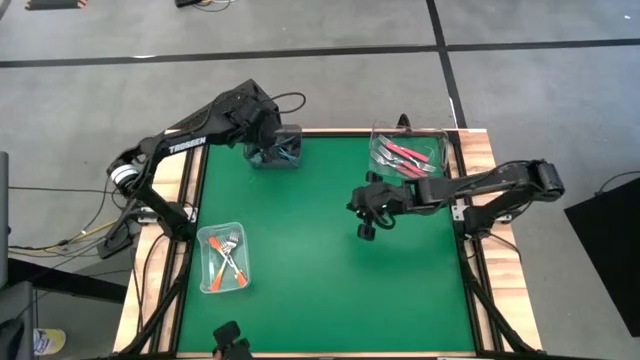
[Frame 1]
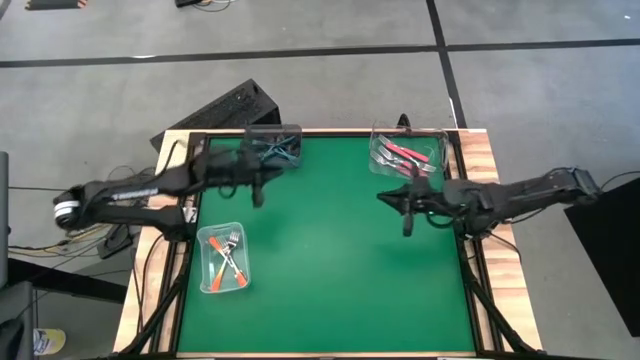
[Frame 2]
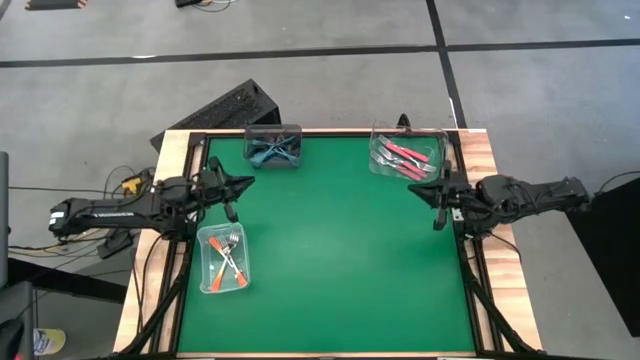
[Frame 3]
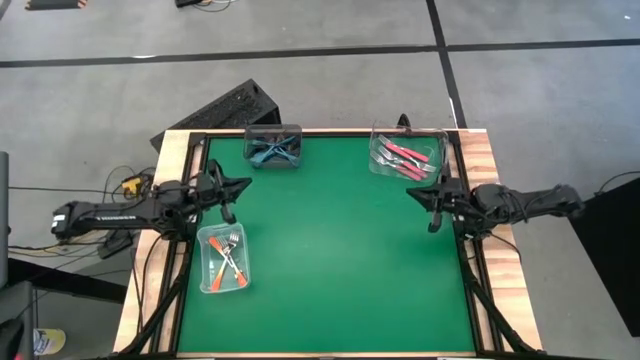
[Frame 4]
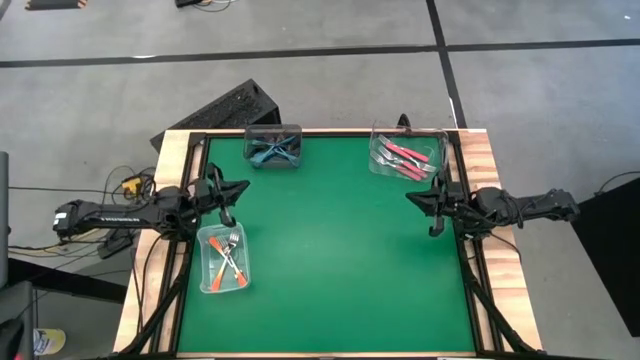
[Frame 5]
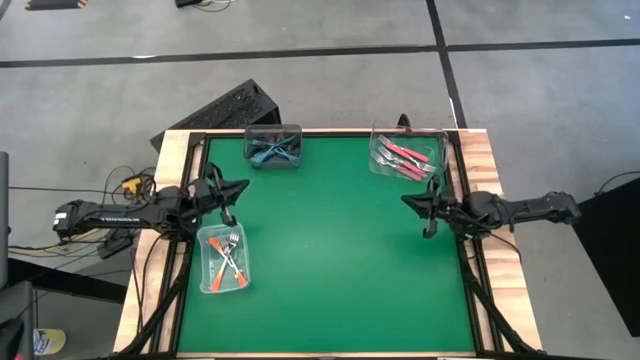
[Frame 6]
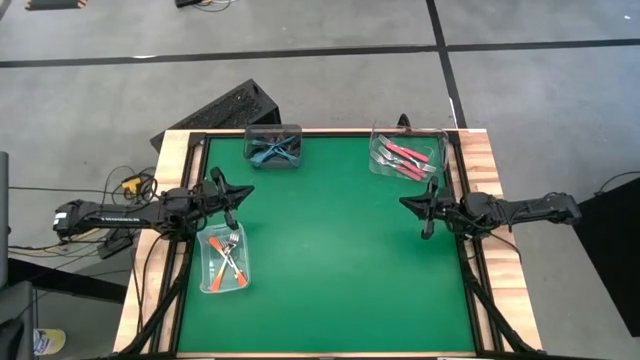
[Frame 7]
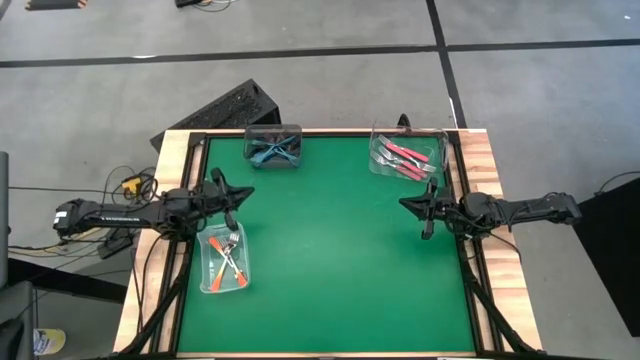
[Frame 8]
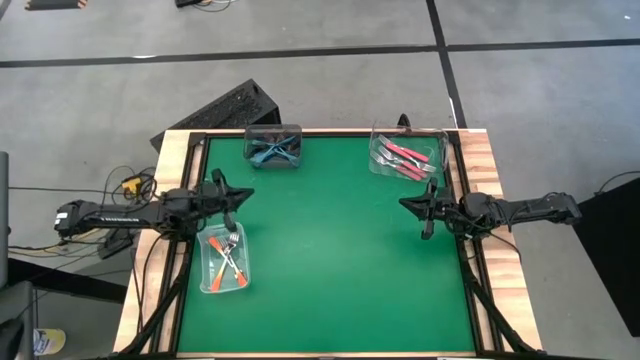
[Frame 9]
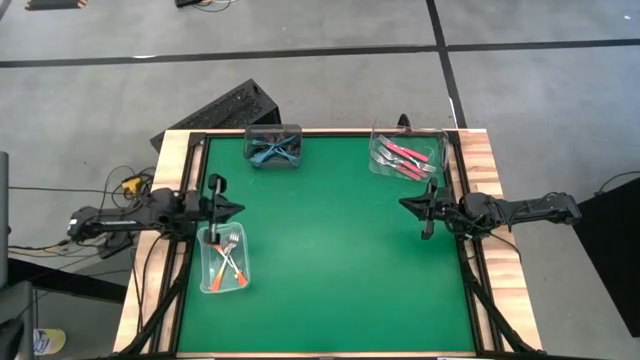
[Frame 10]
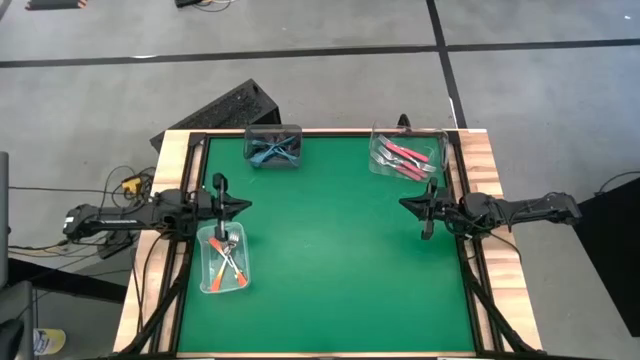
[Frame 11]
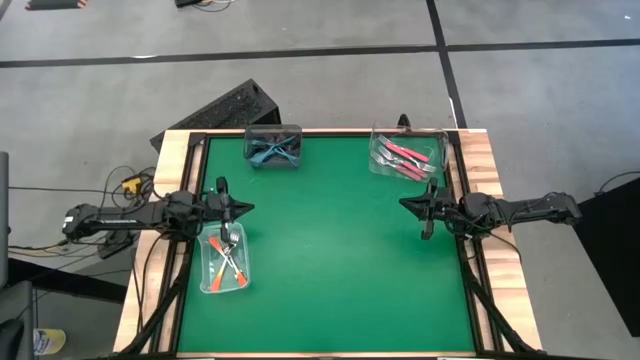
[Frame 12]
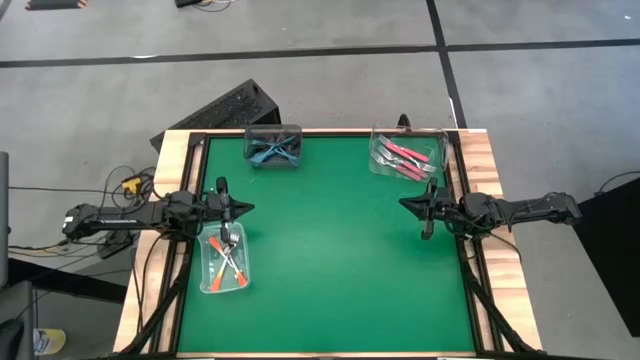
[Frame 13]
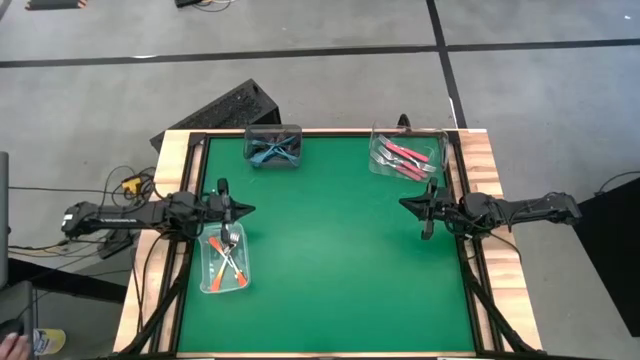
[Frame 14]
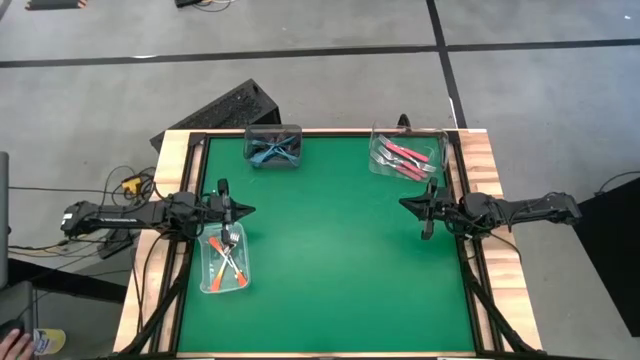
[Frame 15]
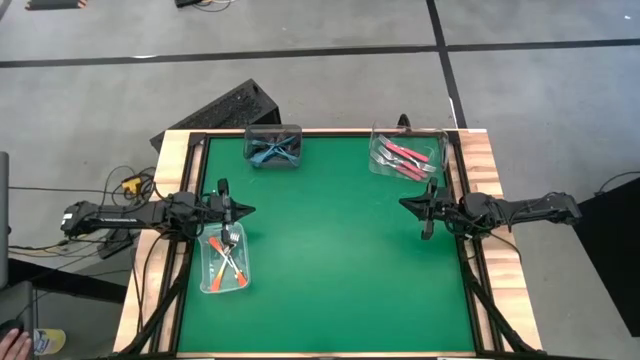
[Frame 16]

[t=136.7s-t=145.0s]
Task: Sort silverware by color (type)
Return to Home Position

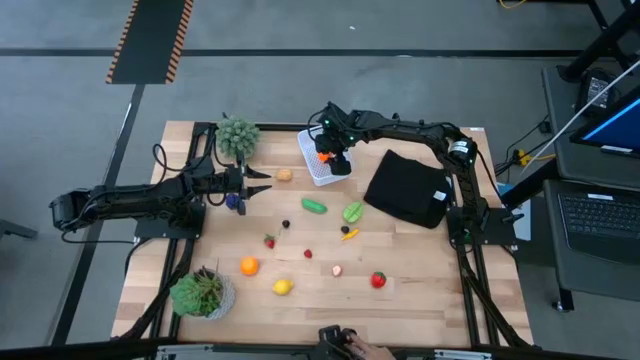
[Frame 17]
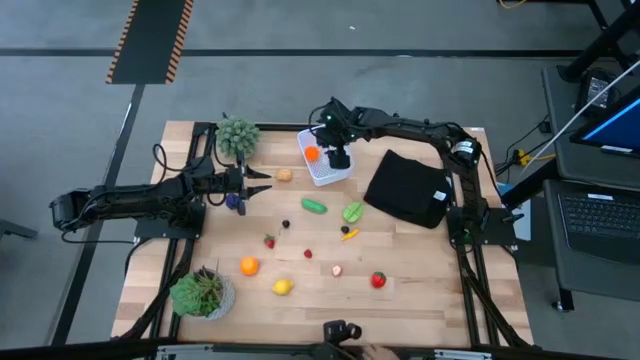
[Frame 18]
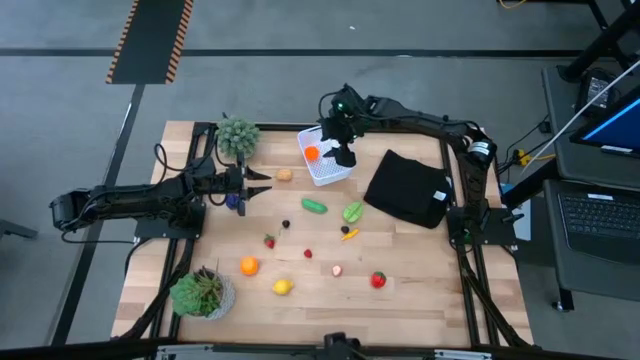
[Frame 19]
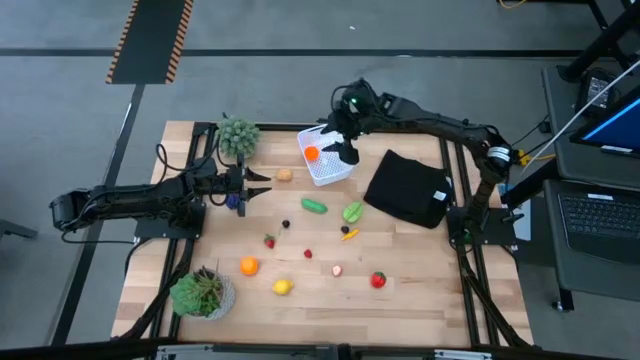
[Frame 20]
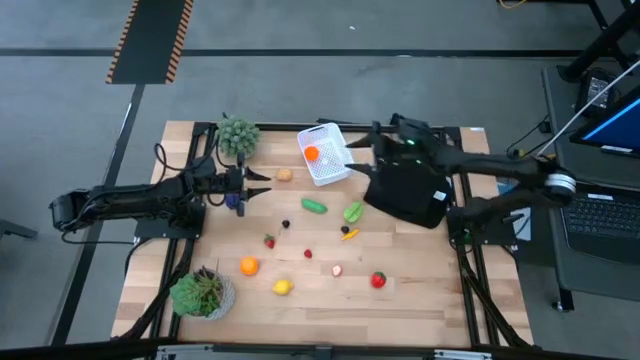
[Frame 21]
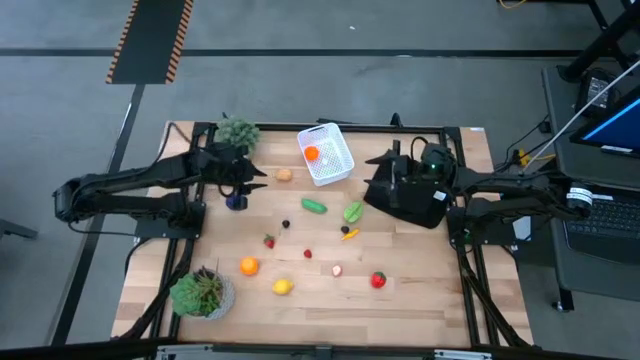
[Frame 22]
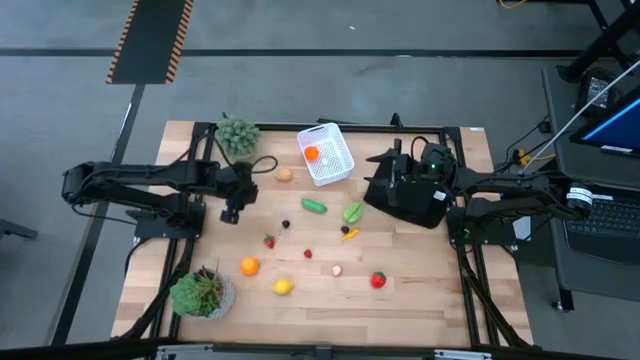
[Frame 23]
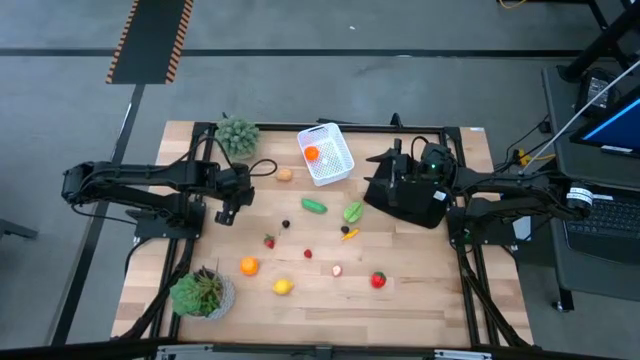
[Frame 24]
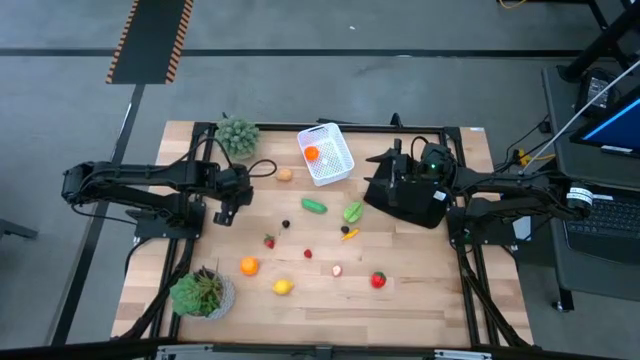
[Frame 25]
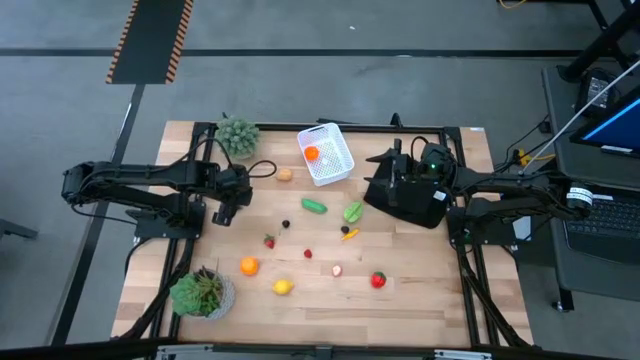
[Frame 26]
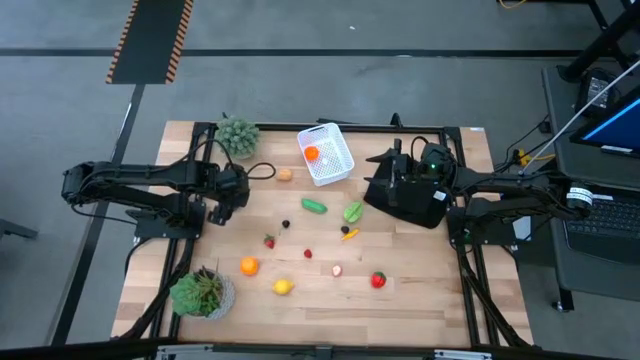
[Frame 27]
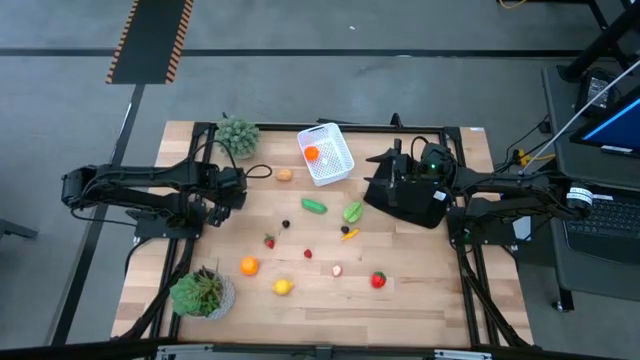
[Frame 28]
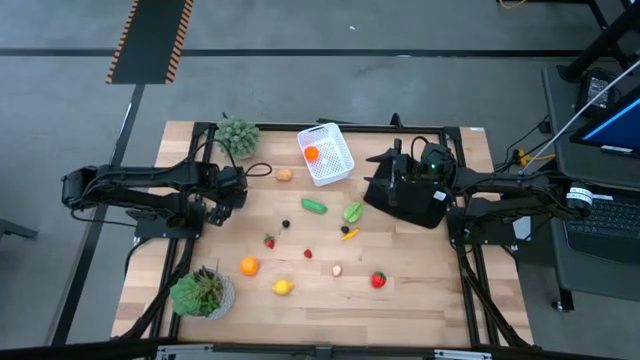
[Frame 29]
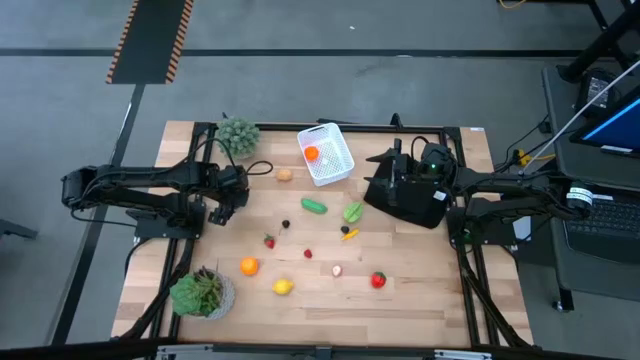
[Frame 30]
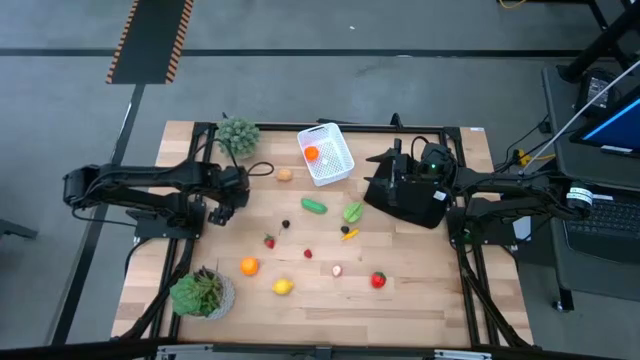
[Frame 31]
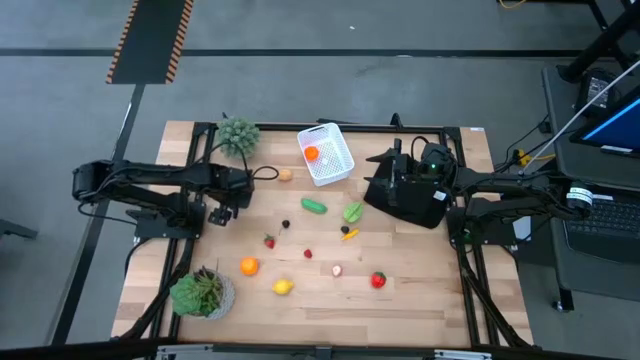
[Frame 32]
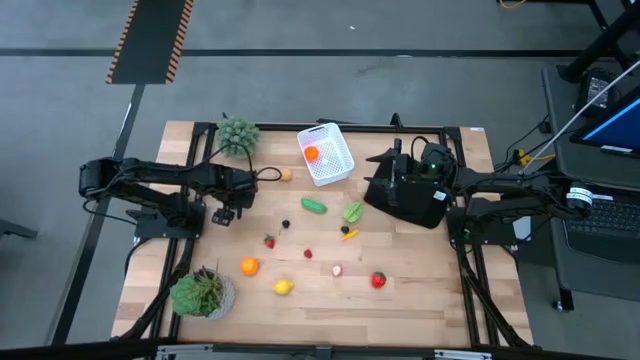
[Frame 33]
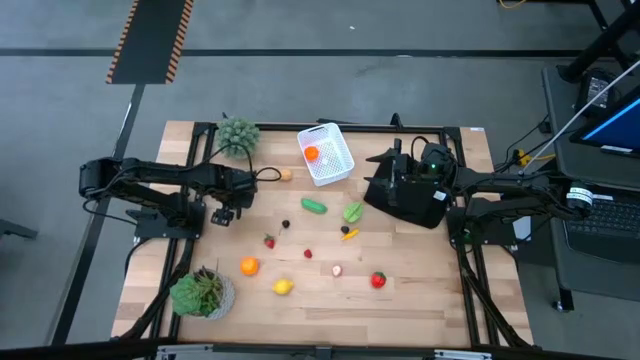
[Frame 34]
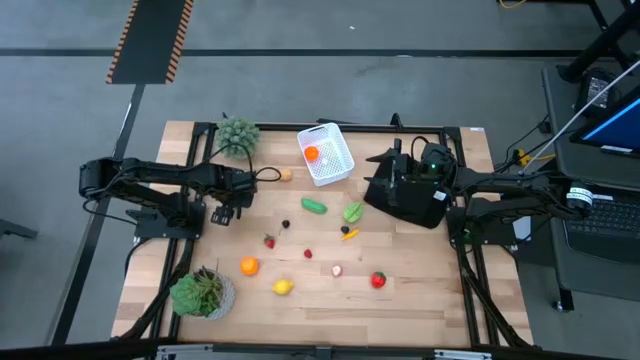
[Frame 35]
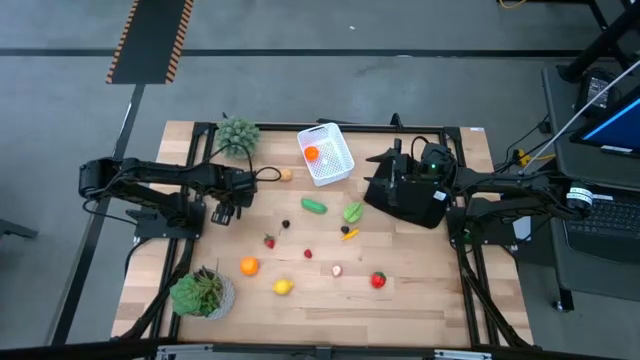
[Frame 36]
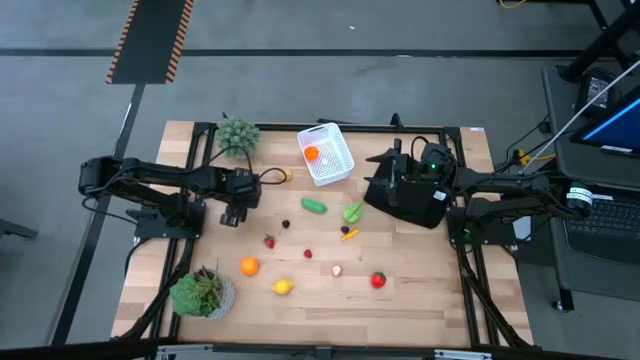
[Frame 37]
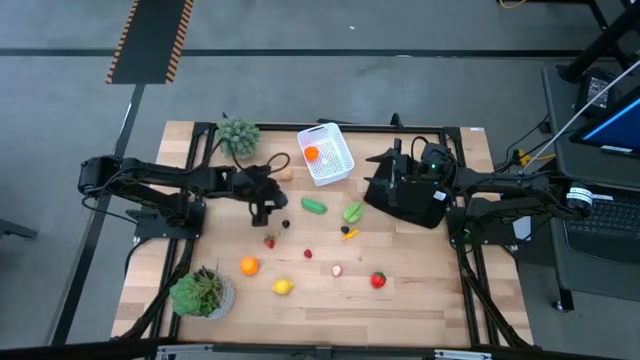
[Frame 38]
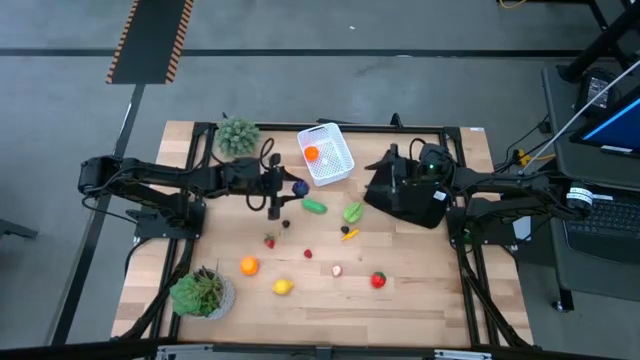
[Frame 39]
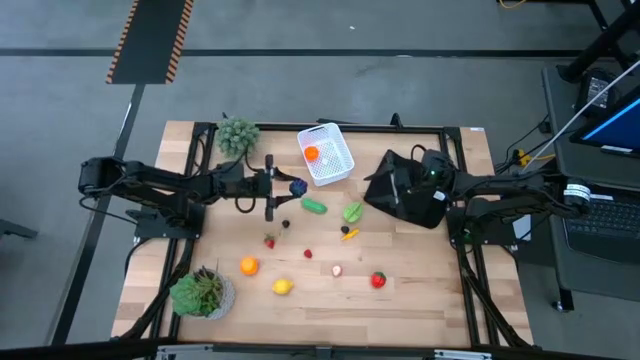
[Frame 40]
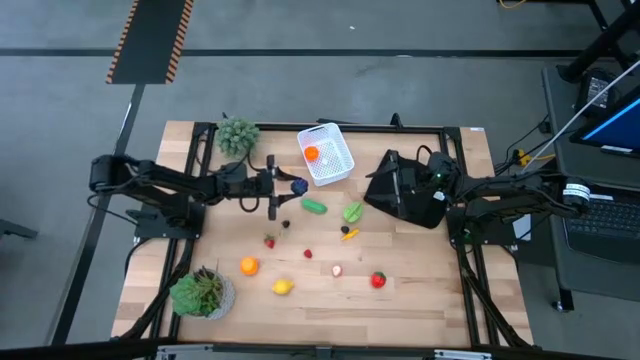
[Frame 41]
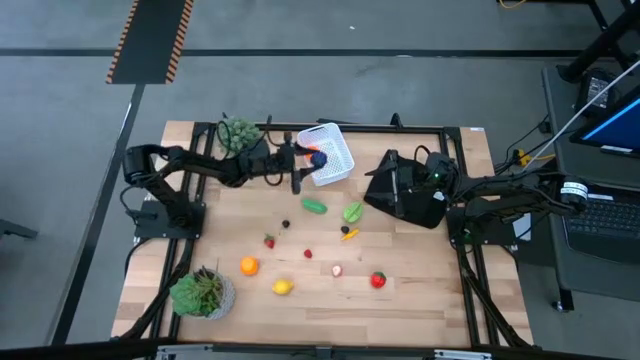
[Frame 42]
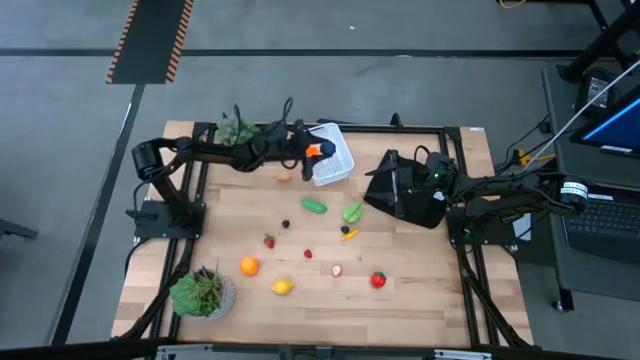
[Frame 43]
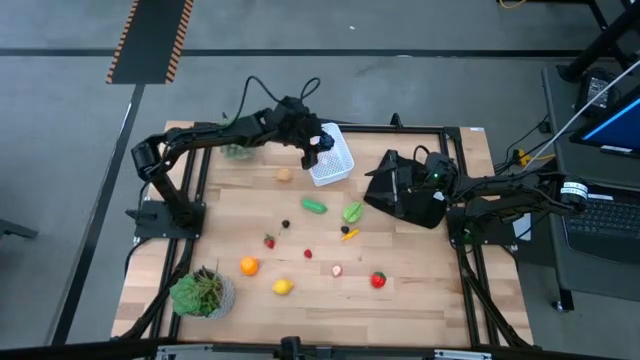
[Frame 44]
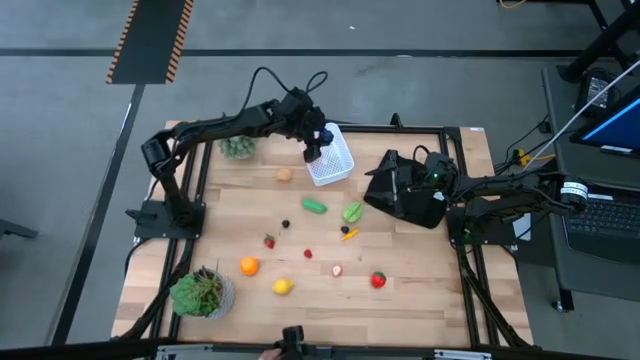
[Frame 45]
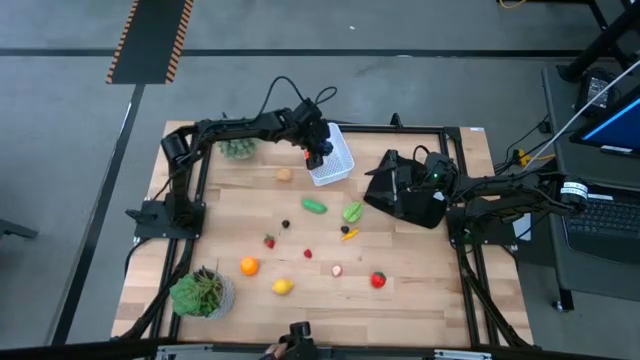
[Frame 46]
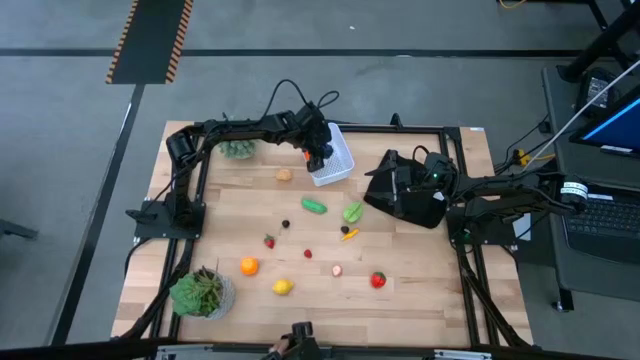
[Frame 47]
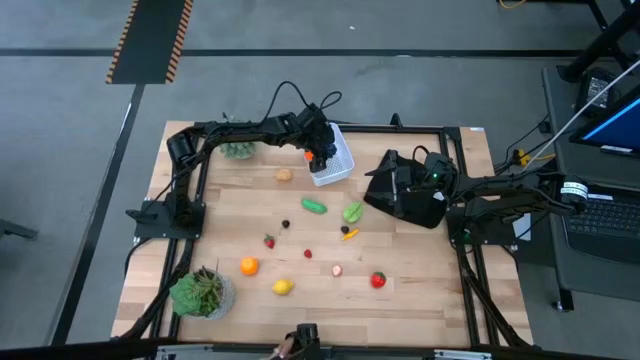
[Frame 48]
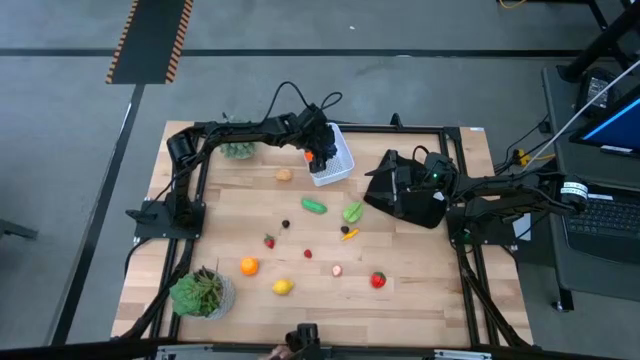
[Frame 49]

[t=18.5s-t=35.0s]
Task: Pick and placing Produce into tupperware
Put the grapes into the basket
